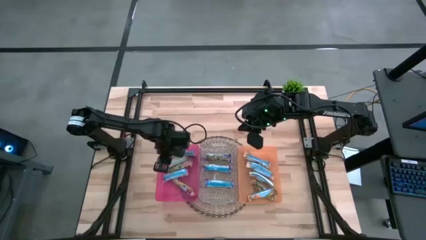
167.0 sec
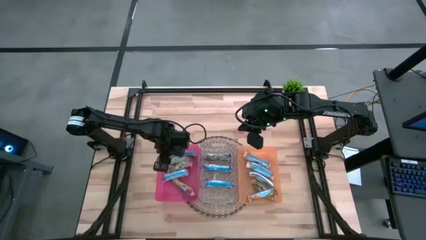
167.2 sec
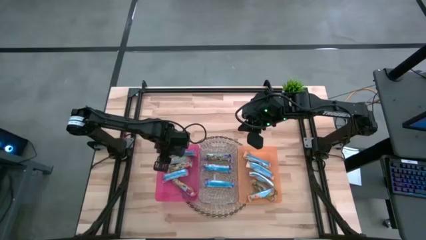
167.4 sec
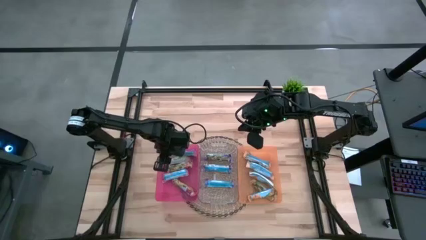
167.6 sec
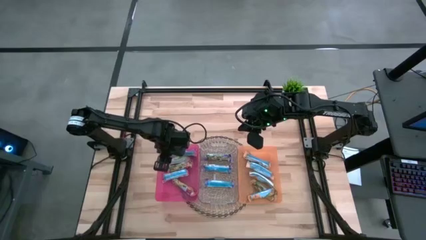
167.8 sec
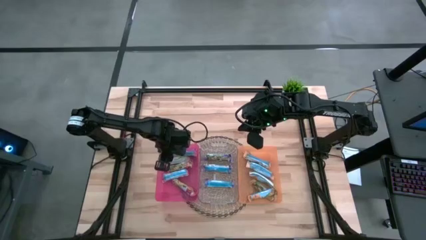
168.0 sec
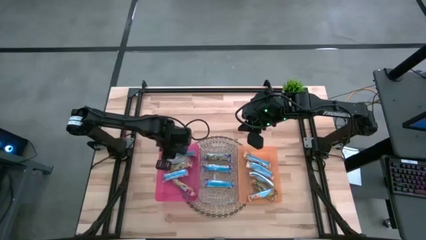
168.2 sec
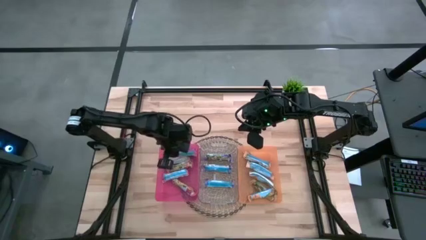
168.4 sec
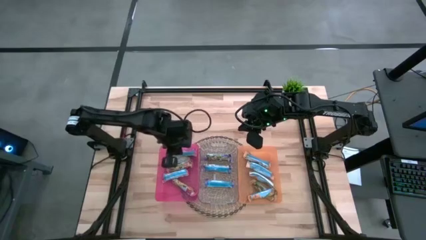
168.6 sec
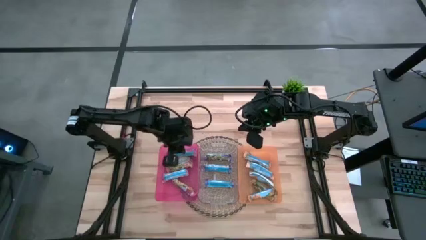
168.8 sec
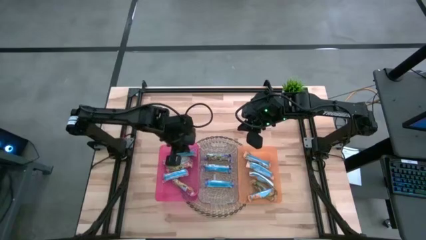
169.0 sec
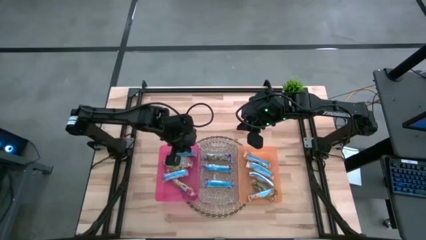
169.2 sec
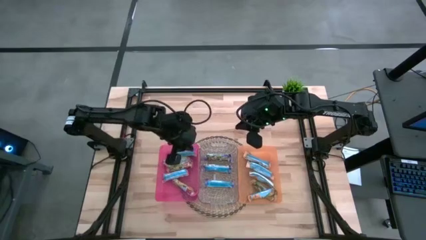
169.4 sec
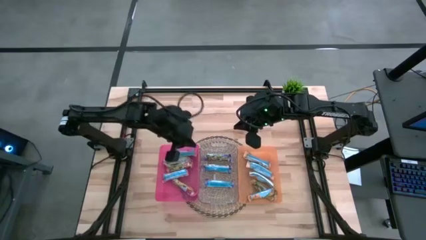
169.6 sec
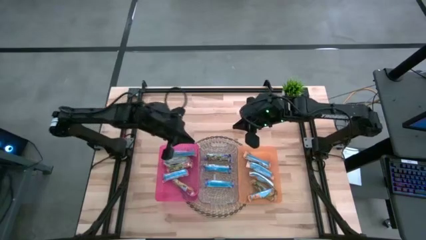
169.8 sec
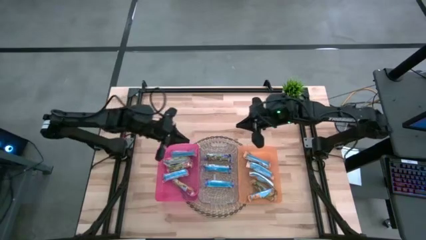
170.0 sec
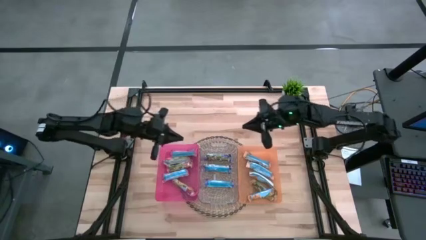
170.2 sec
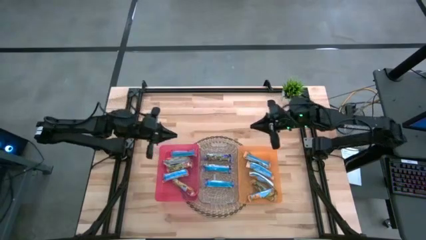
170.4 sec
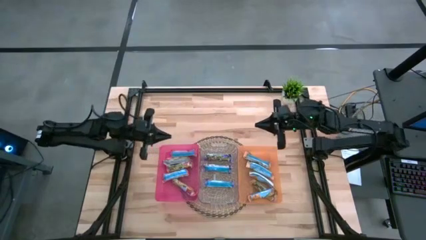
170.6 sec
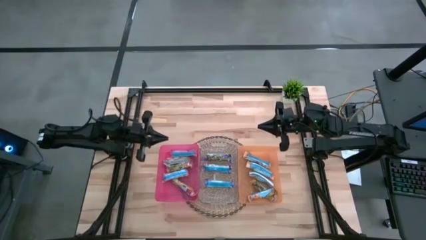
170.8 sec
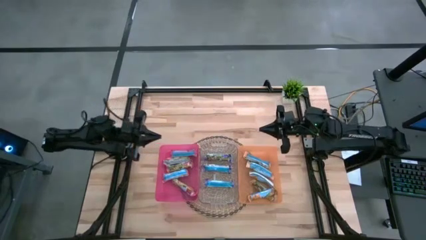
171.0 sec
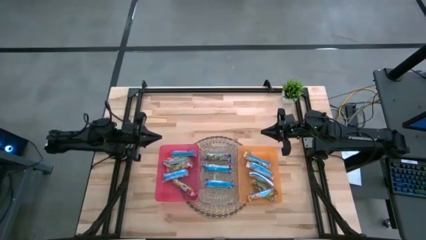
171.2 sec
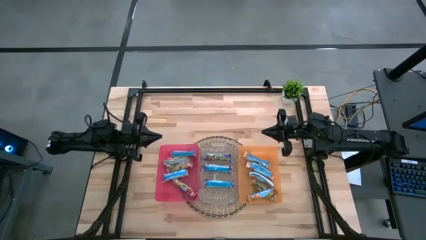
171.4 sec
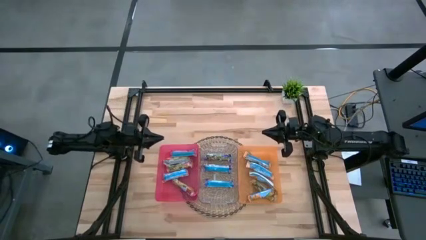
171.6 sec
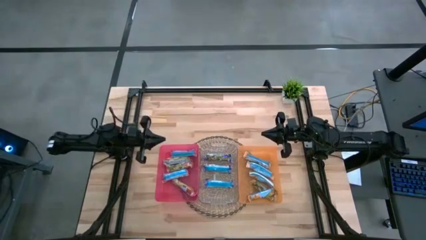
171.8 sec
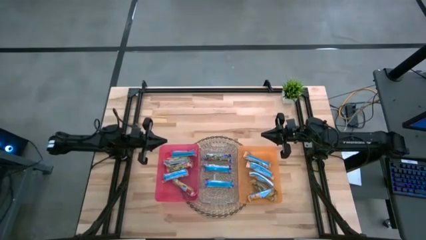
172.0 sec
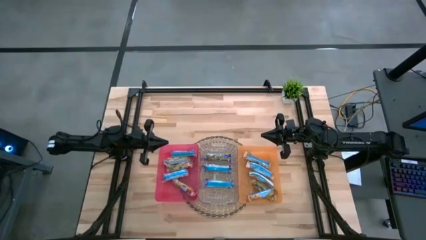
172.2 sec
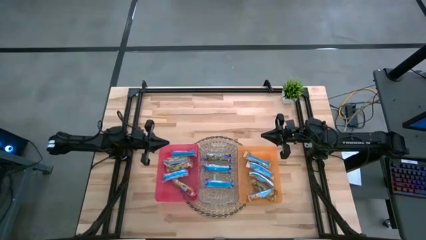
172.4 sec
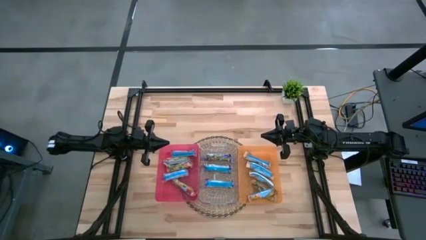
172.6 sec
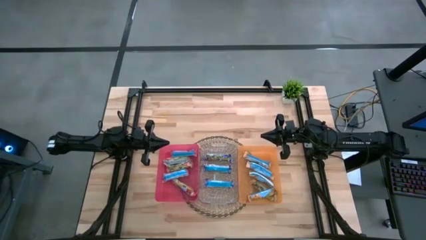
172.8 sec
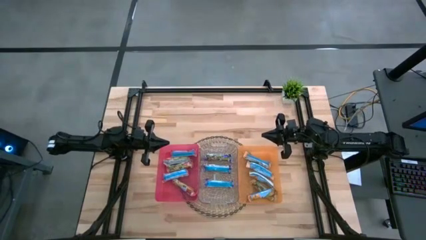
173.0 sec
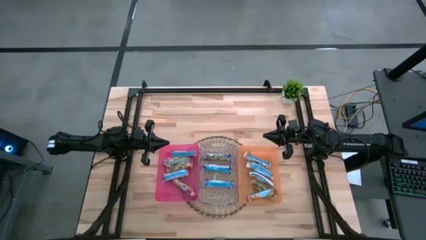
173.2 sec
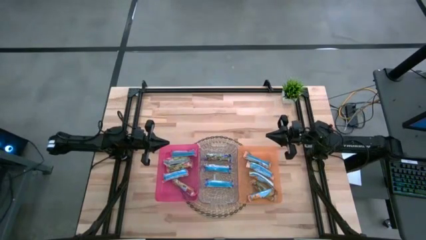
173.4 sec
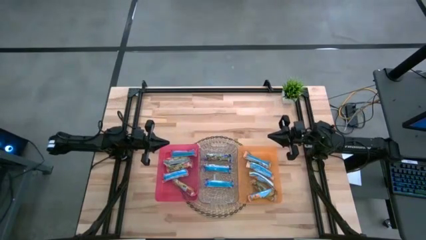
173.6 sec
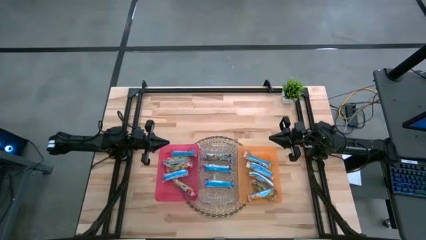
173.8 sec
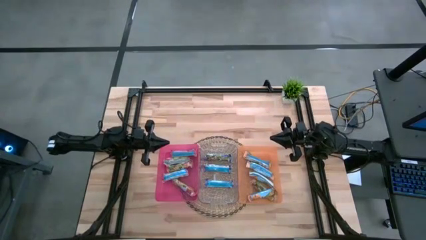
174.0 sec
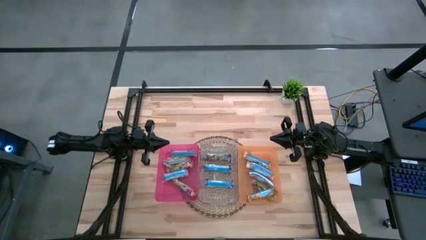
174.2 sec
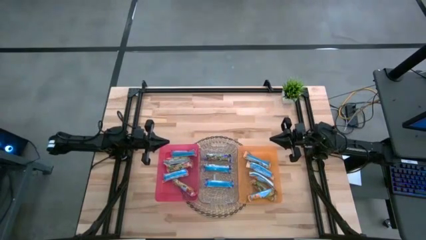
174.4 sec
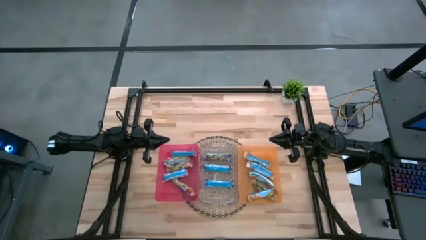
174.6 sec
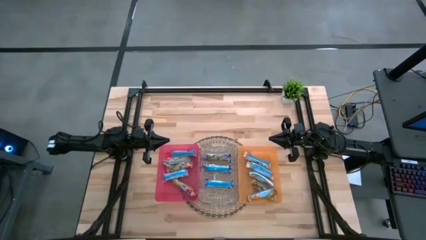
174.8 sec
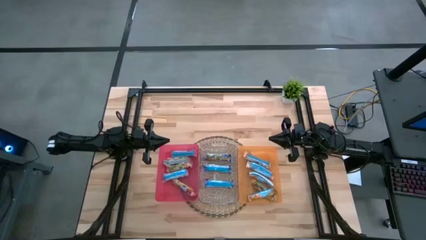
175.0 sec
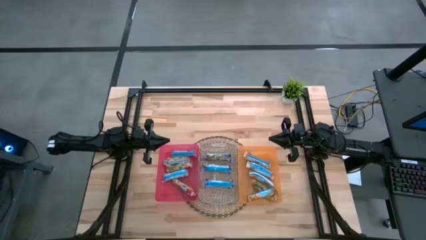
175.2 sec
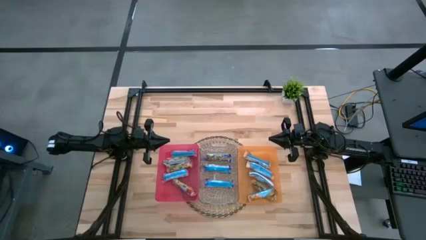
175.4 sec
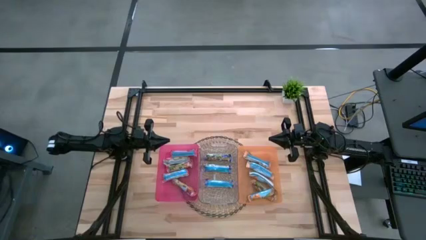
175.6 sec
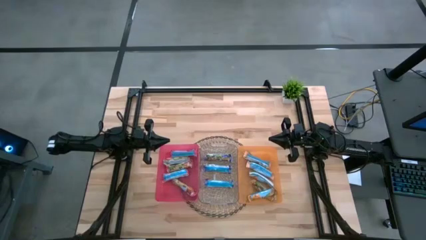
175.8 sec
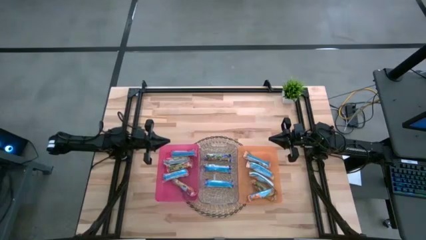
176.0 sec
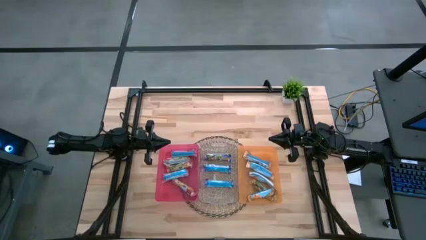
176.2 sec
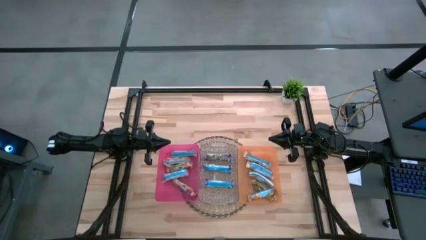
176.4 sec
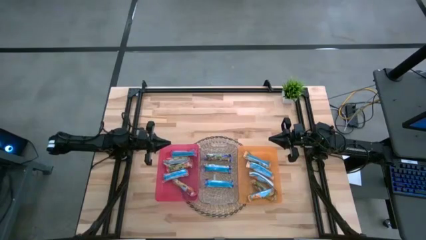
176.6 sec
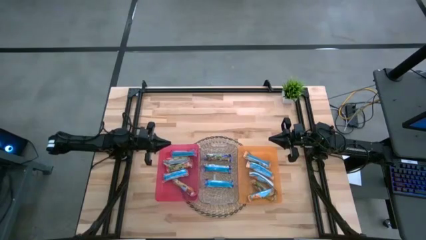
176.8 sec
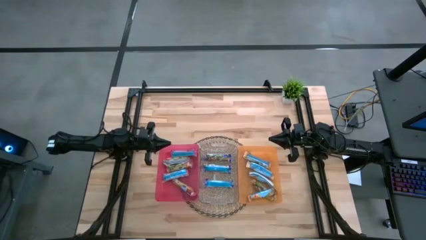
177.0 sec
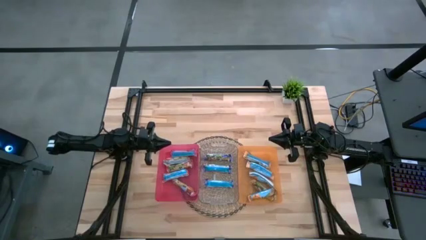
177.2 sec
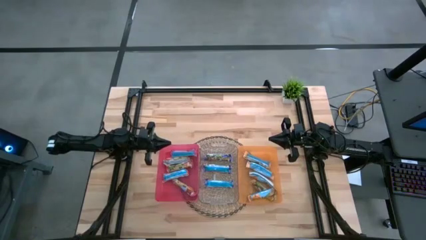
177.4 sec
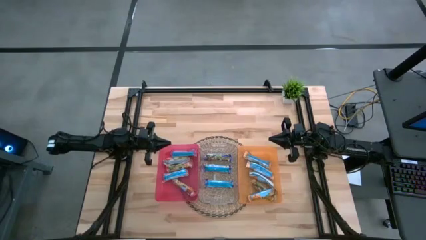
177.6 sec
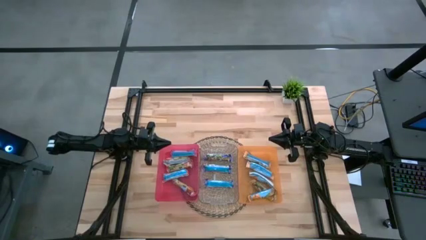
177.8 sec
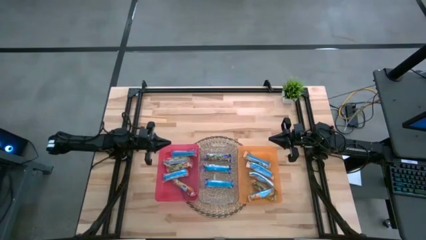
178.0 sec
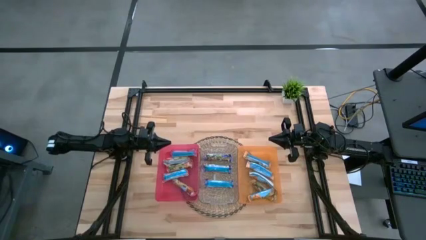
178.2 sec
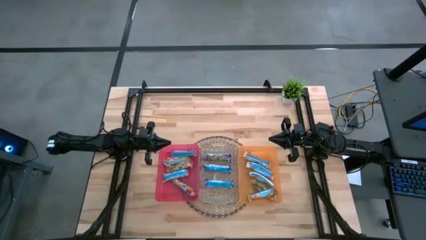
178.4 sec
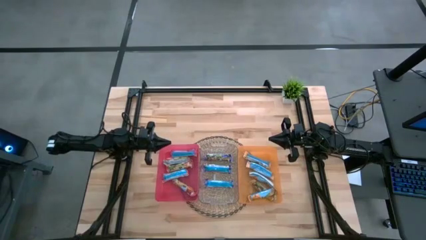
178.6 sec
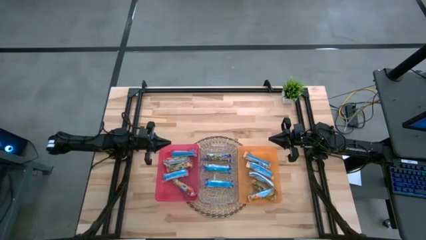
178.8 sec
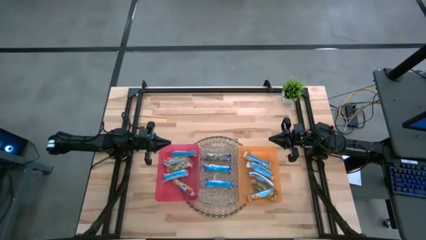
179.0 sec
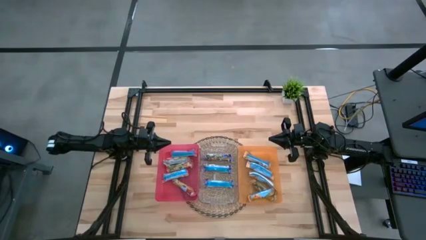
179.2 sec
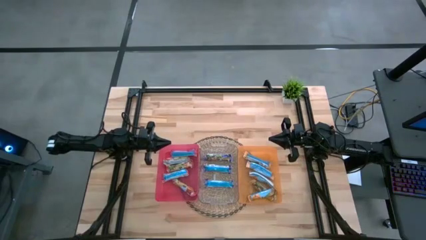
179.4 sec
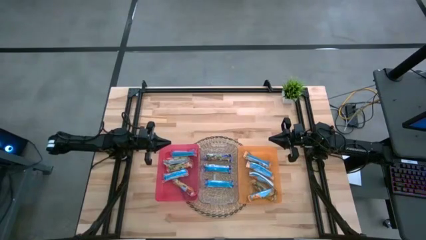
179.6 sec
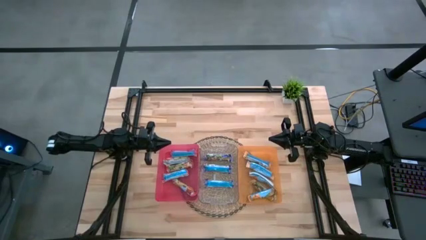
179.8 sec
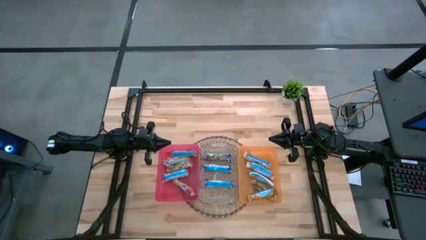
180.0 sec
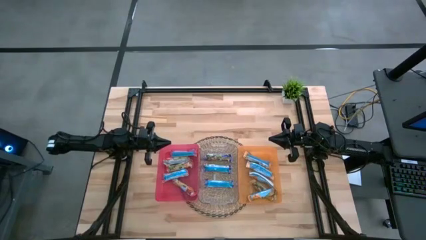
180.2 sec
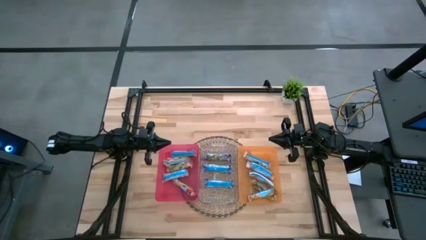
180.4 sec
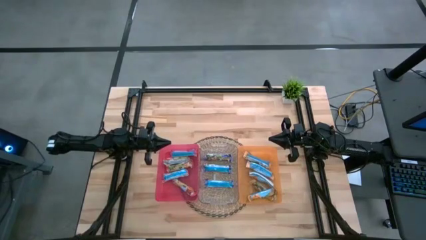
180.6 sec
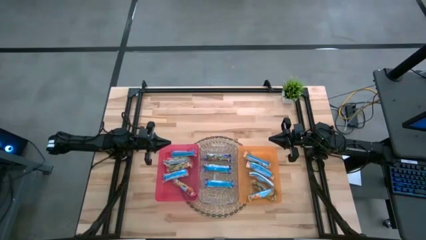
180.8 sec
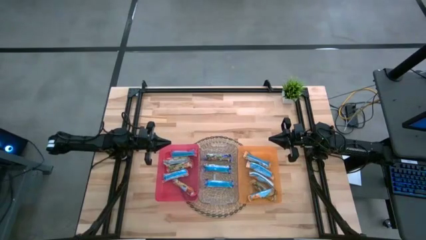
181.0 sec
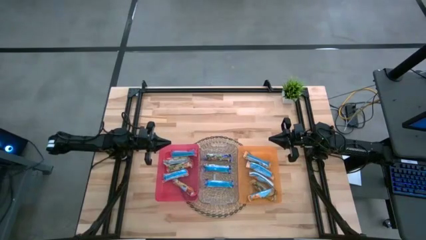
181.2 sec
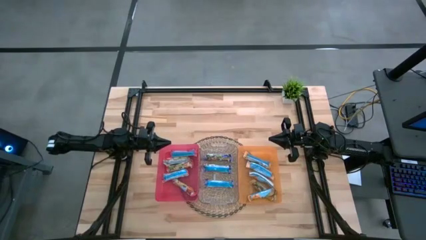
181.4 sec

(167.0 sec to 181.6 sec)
Task: Pick and place Granola Bars by type
Return to Home Position
